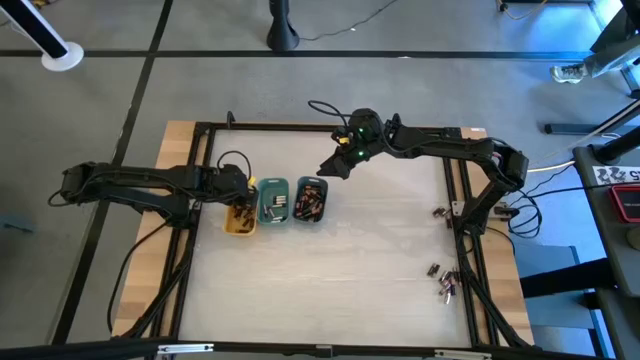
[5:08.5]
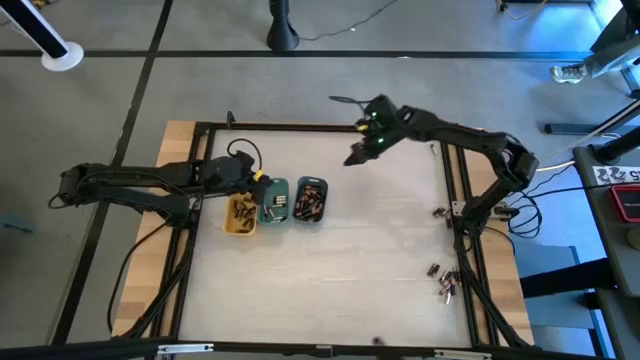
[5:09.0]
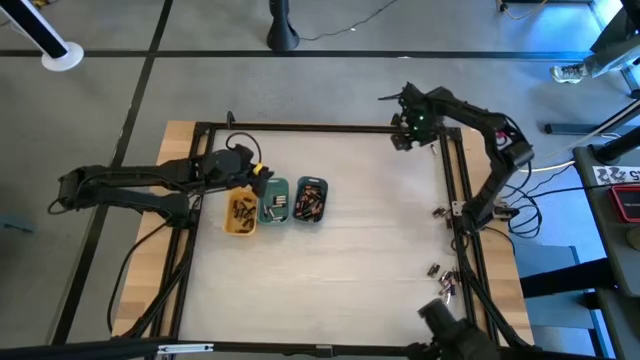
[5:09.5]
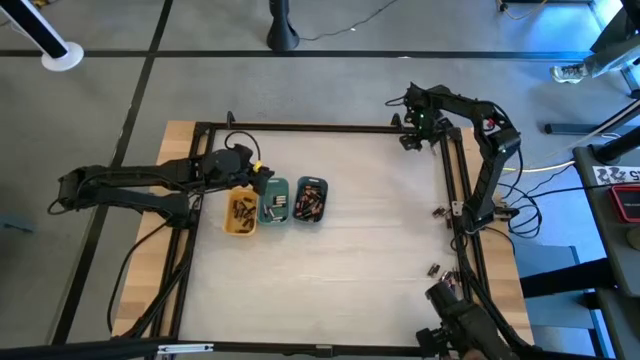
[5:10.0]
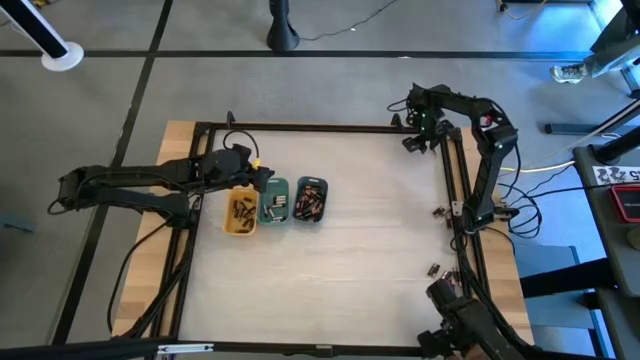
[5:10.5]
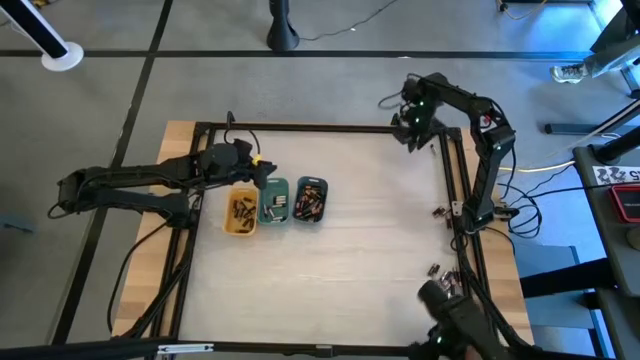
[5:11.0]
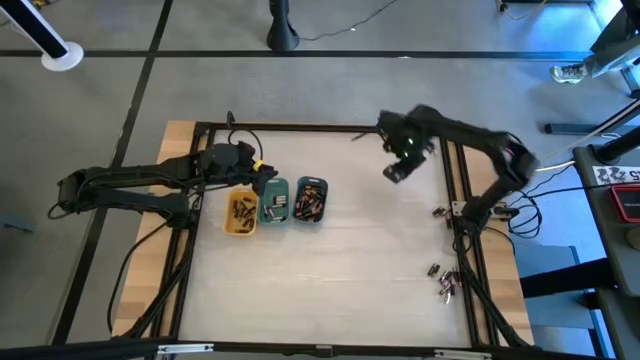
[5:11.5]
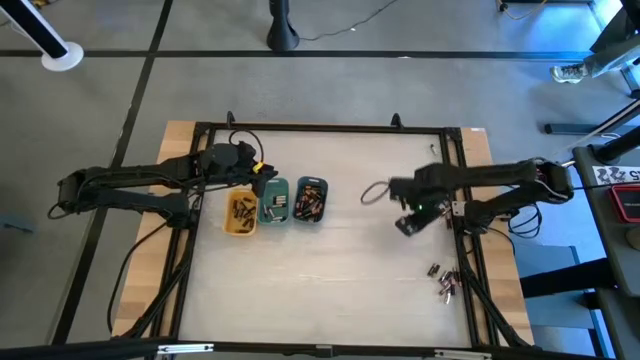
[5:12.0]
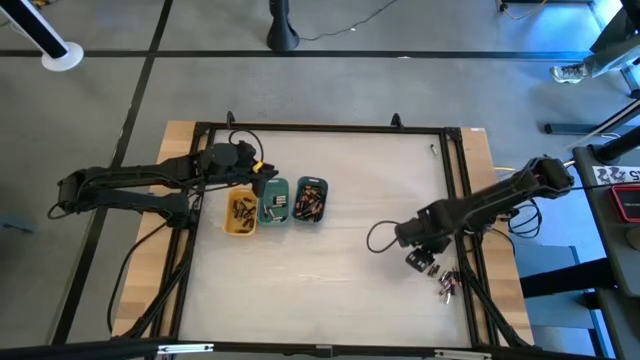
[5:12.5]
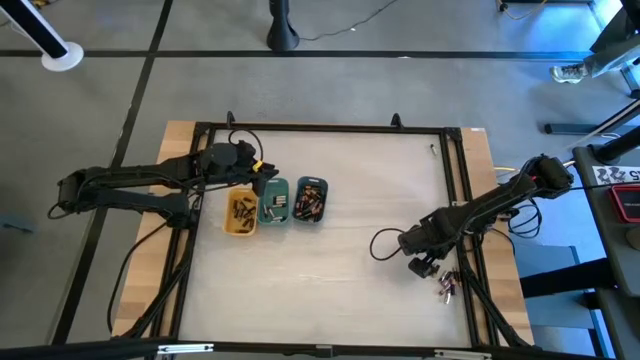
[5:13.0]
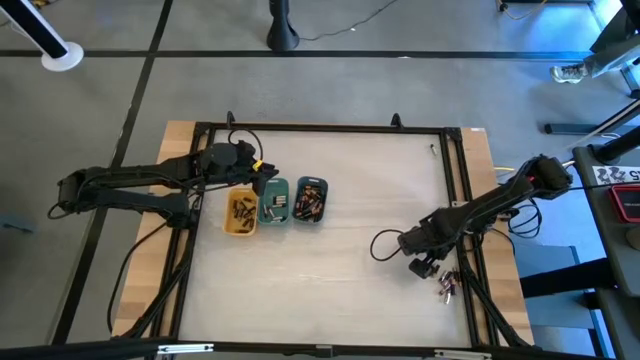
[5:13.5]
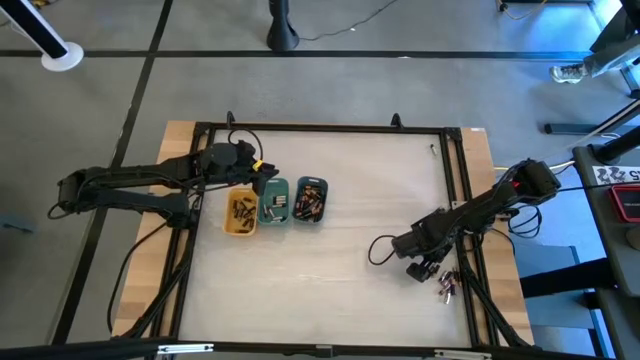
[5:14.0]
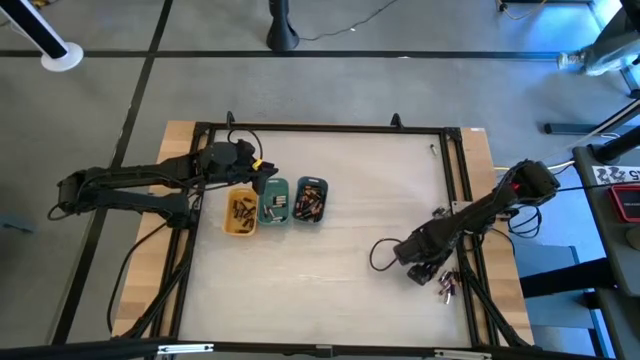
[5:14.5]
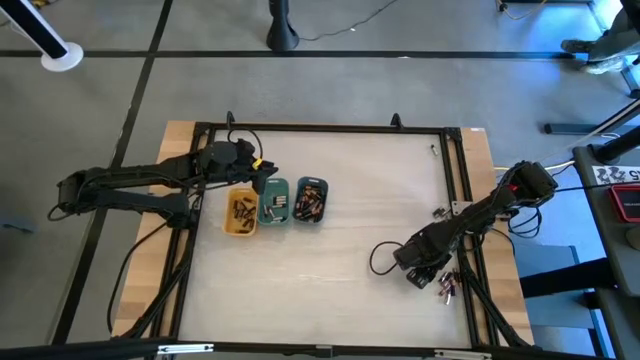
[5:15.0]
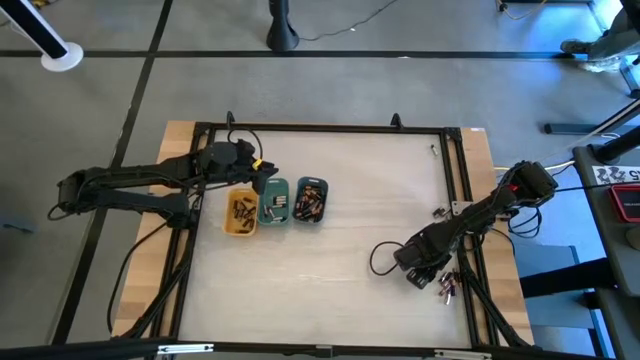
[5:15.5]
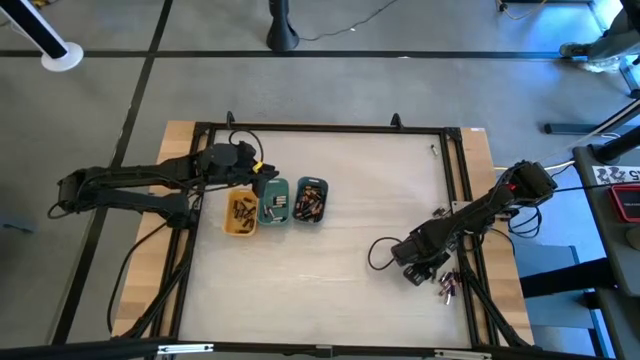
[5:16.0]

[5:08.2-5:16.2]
Task: Sort batteries
Put the small black battery into the yellow bin

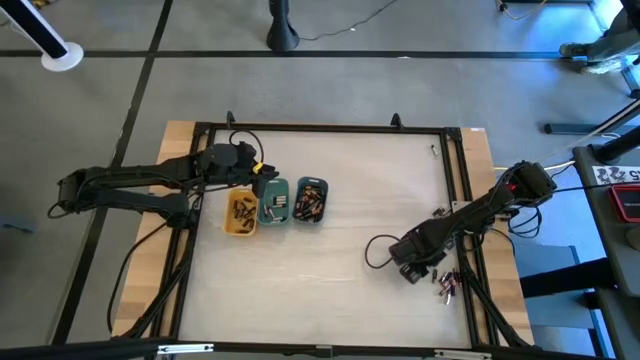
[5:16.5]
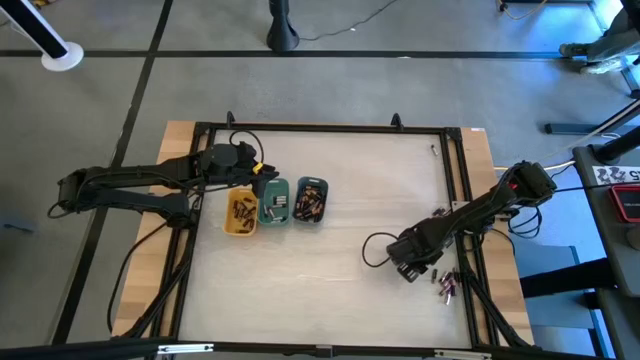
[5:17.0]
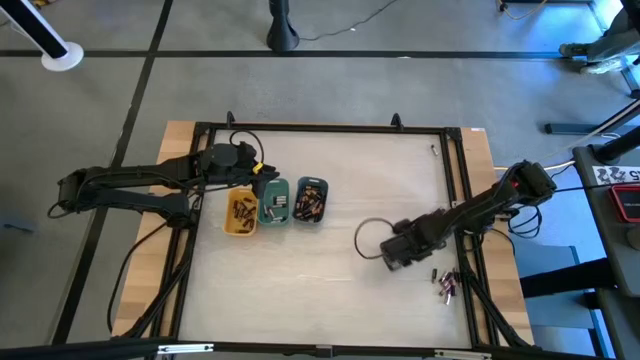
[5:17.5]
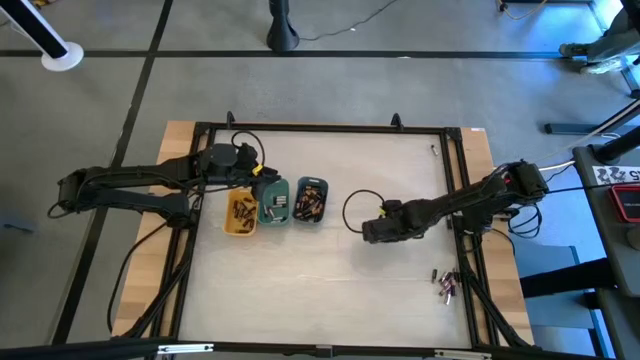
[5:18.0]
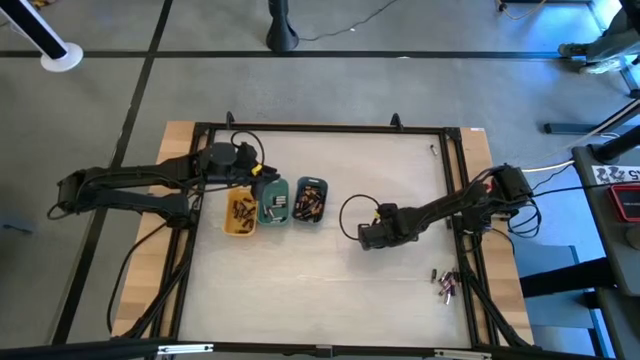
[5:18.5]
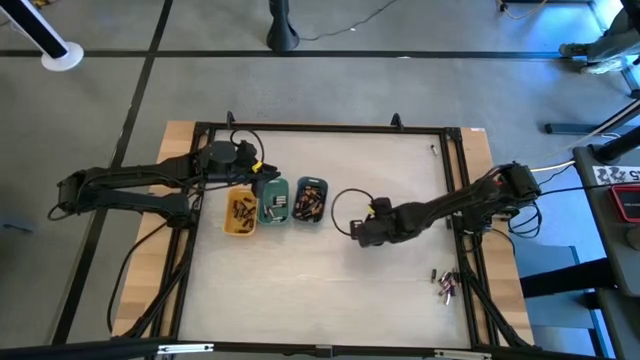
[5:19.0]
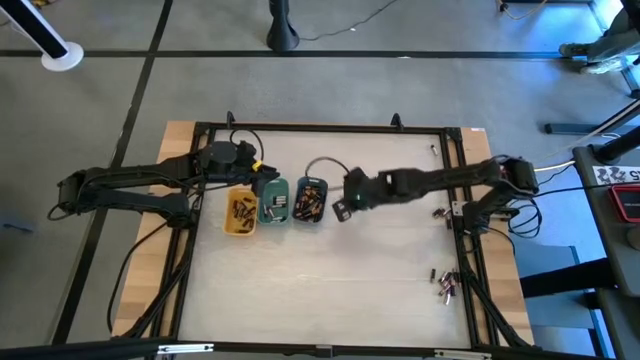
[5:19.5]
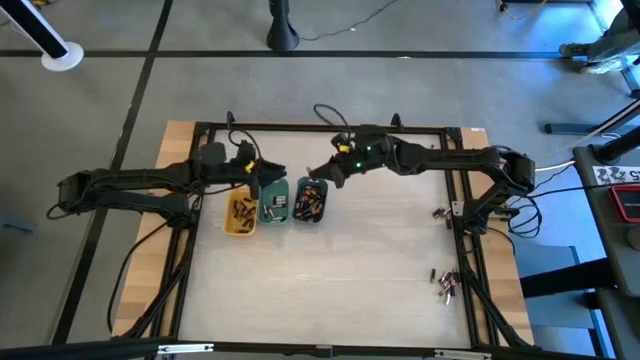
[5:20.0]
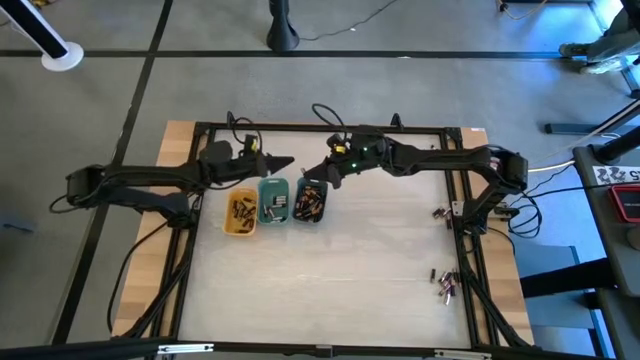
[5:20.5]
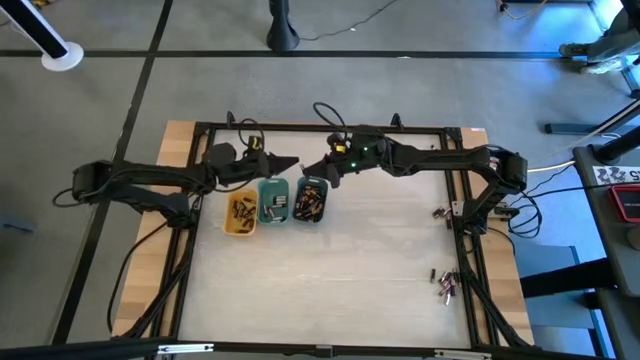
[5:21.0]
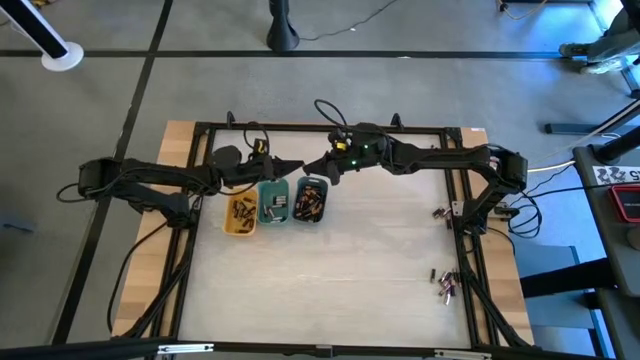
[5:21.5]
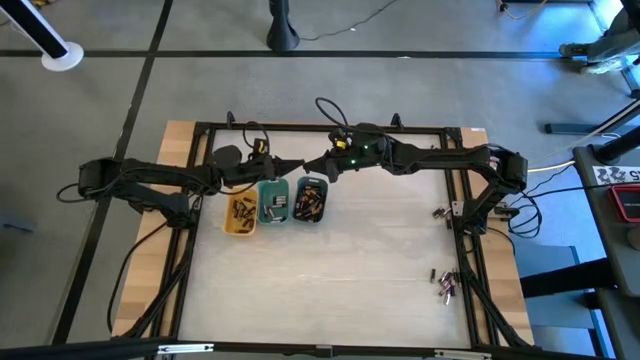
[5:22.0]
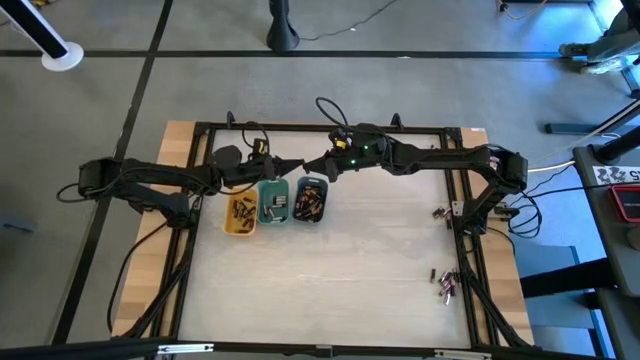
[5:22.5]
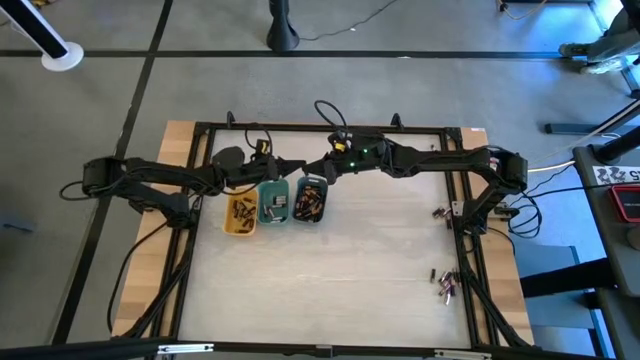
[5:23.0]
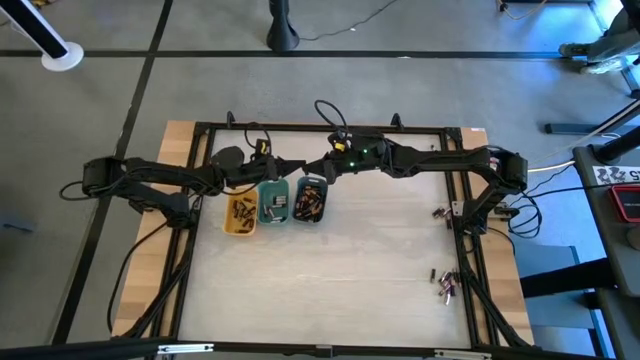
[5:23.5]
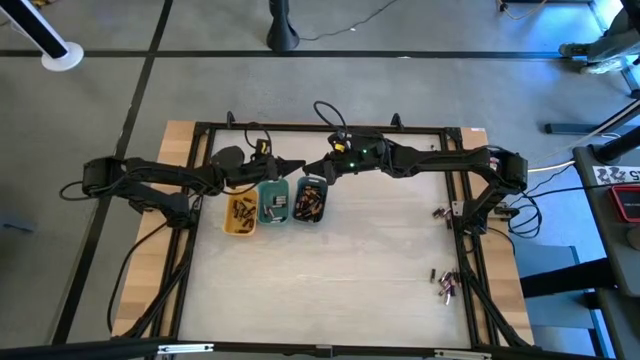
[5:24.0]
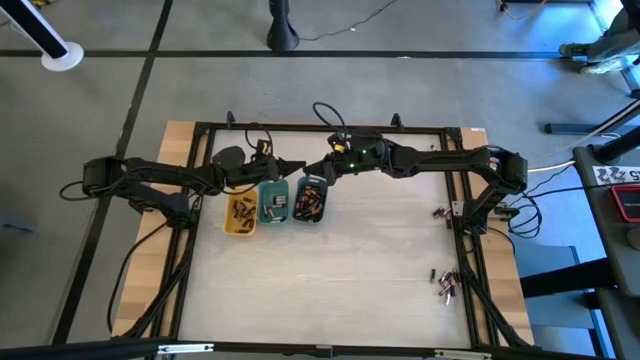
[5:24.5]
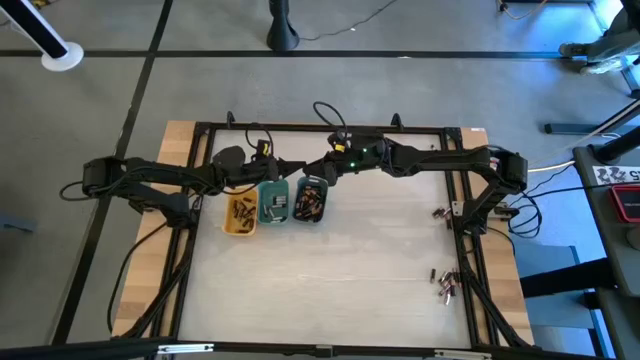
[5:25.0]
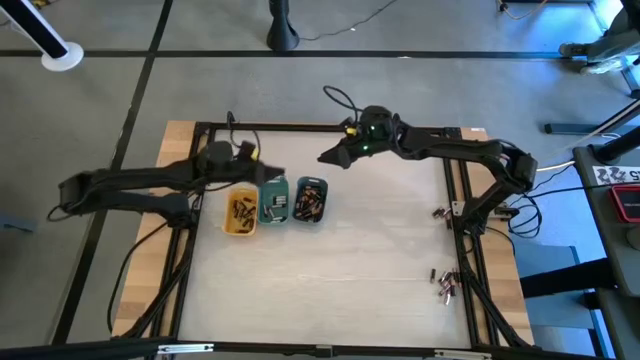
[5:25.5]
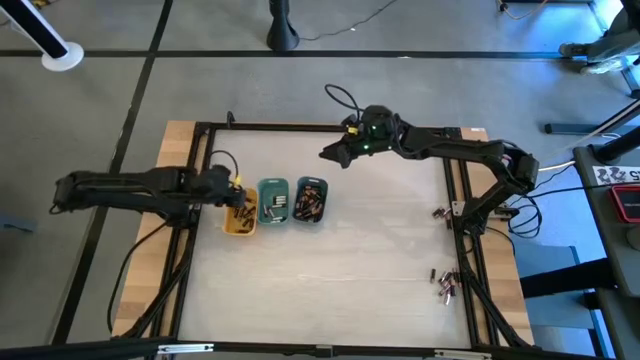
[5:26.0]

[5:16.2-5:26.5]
Put the small black battery into the yellow bin

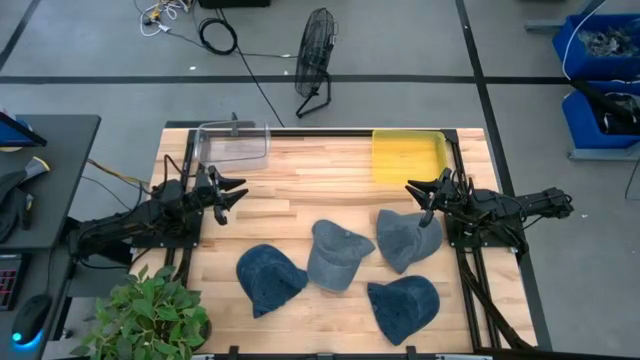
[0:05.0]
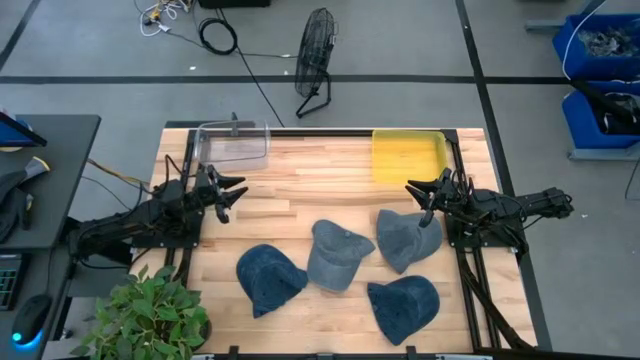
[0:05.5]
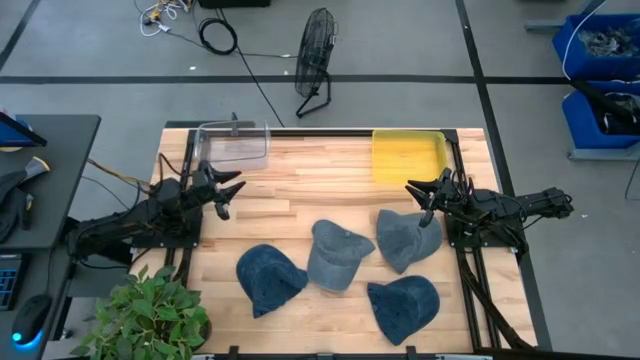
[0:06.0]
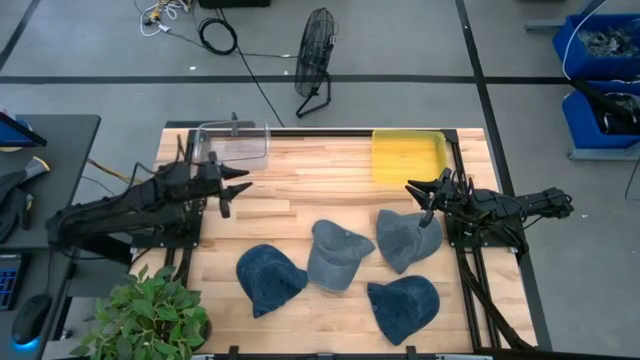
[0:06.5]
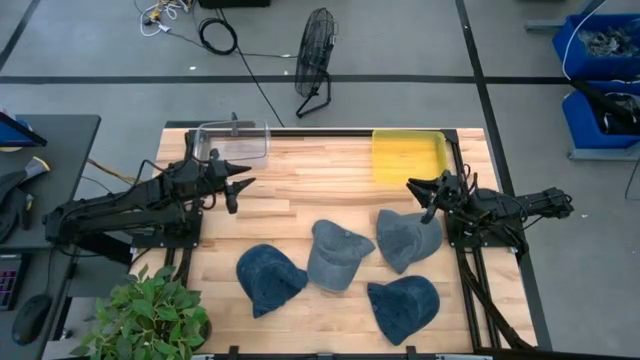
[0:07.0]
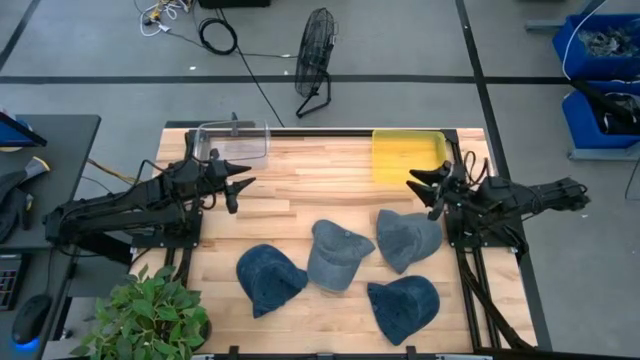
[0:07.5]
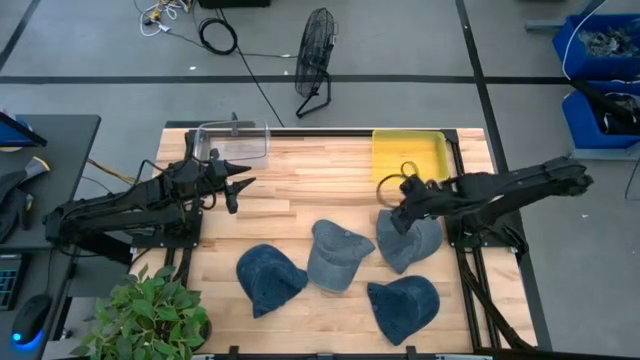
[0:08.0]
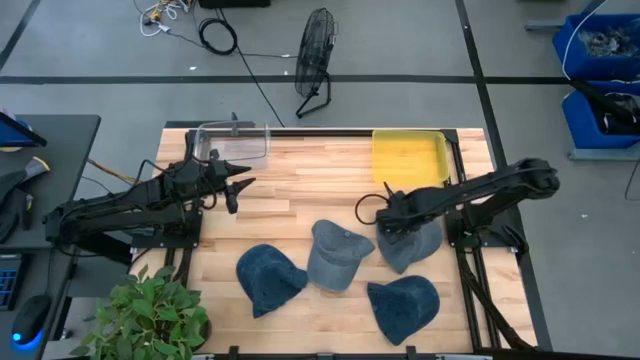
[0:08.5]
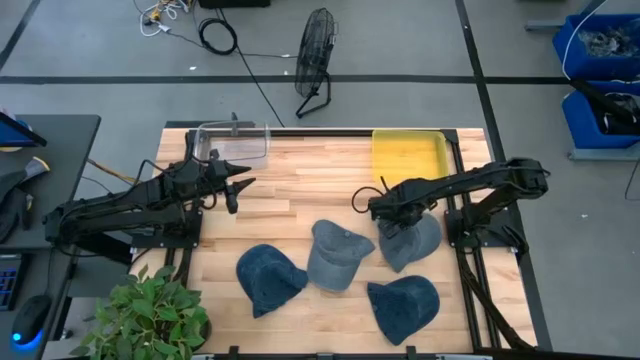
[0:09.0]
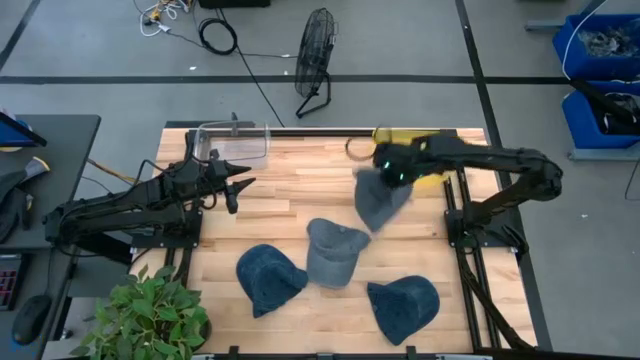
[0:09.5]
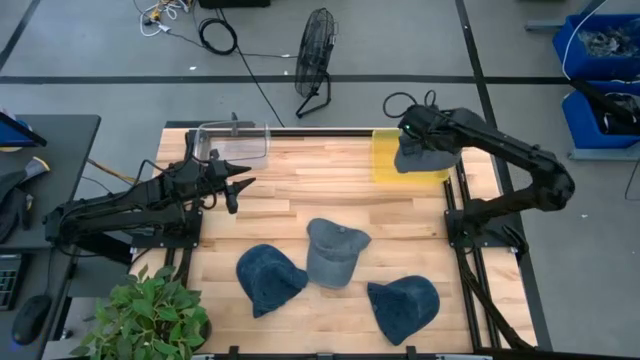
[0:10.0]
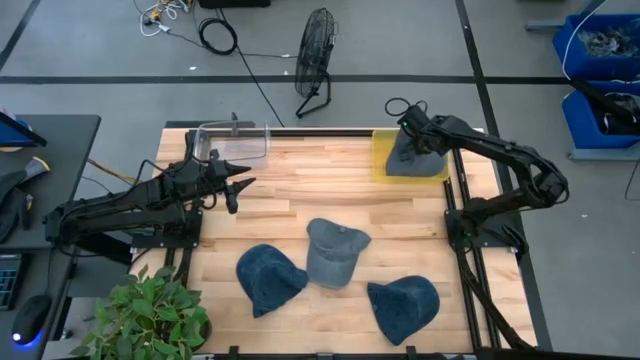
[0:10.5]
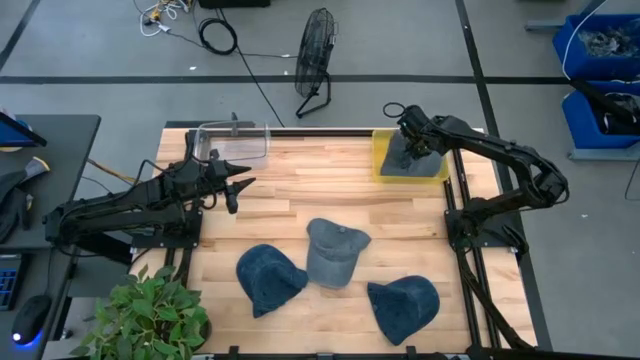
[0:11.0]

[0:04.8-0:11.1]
Task: Pick & Place hat
Put the right black cap into the yellow bin
